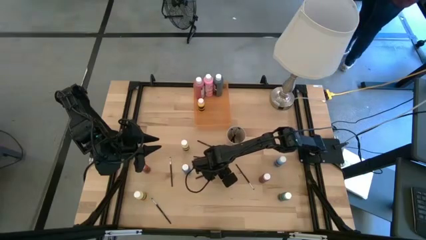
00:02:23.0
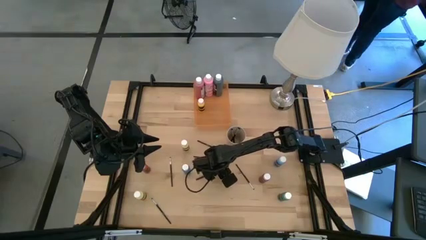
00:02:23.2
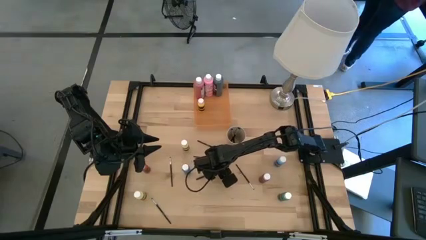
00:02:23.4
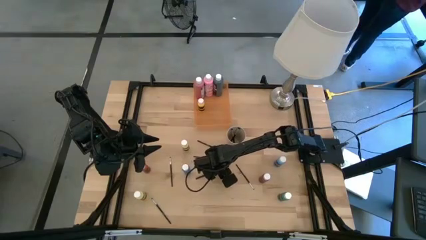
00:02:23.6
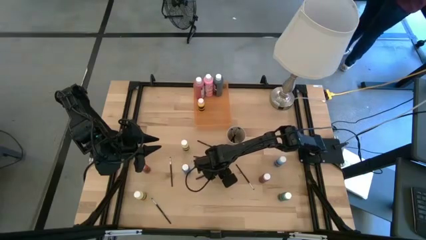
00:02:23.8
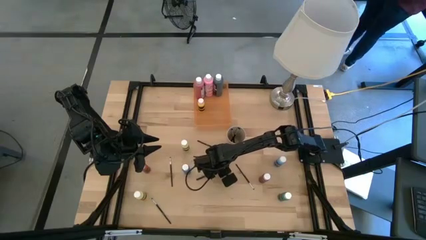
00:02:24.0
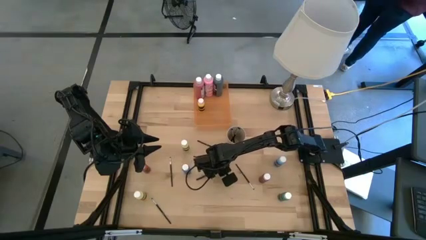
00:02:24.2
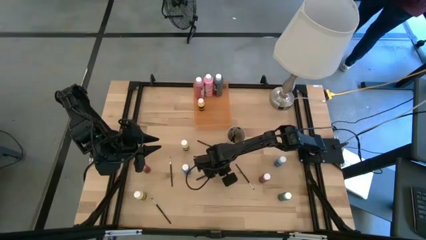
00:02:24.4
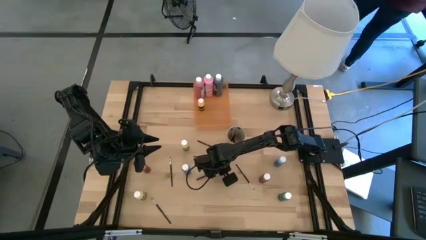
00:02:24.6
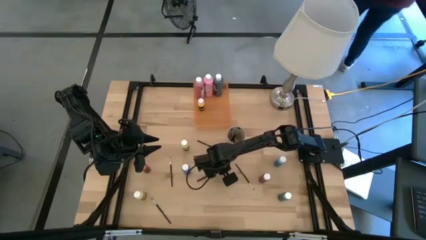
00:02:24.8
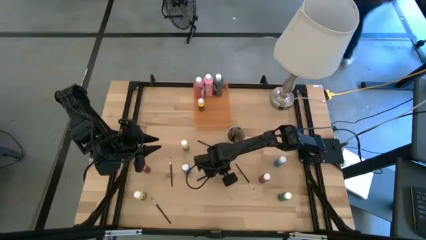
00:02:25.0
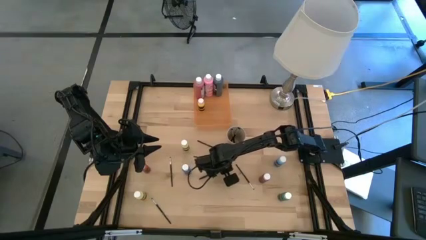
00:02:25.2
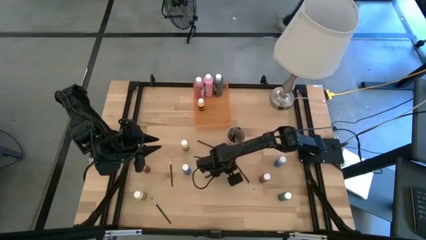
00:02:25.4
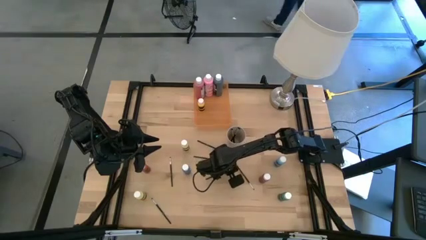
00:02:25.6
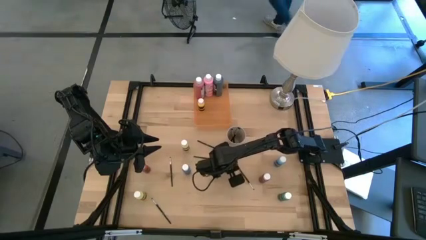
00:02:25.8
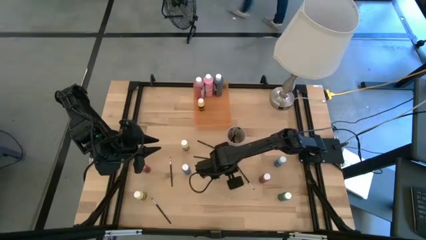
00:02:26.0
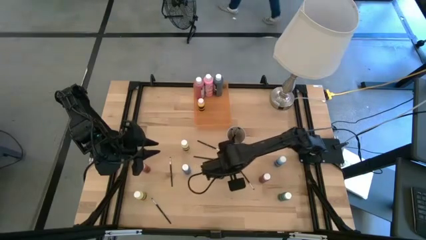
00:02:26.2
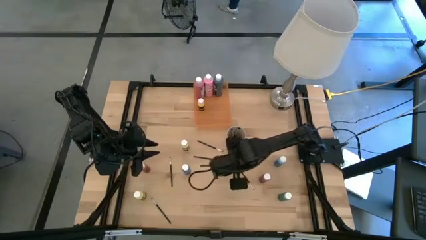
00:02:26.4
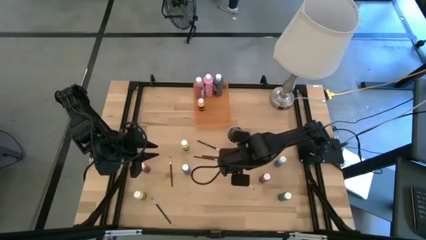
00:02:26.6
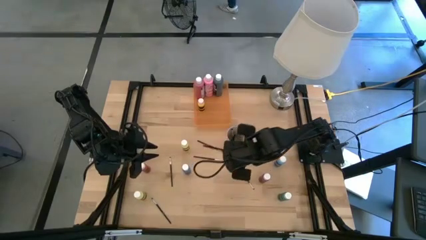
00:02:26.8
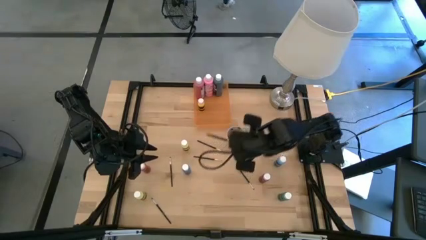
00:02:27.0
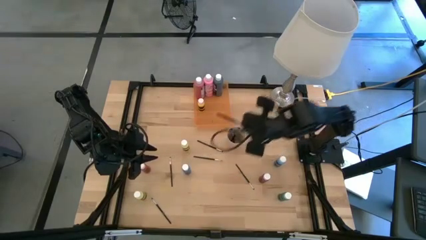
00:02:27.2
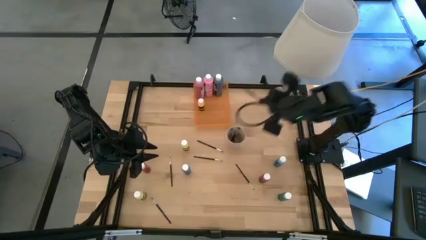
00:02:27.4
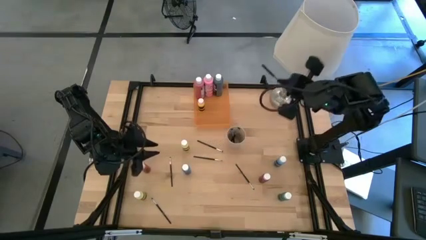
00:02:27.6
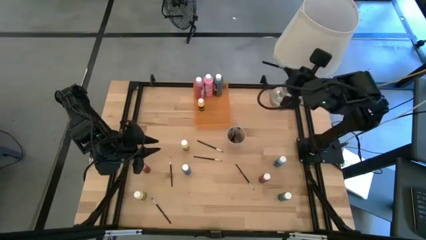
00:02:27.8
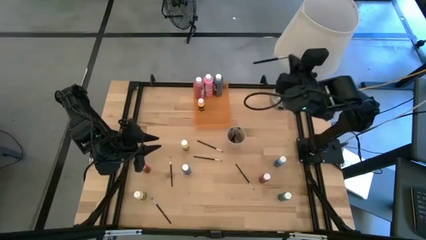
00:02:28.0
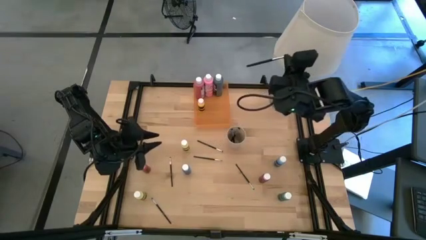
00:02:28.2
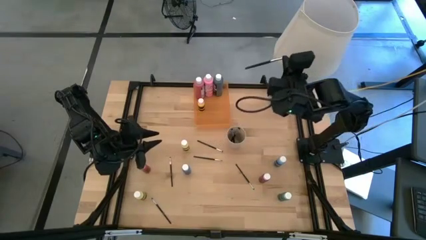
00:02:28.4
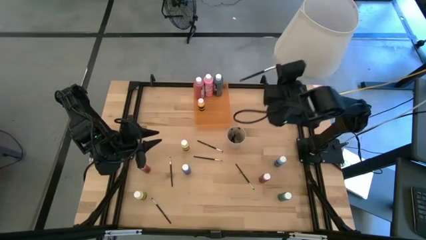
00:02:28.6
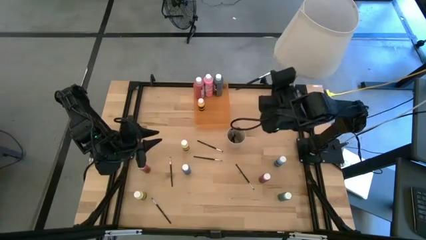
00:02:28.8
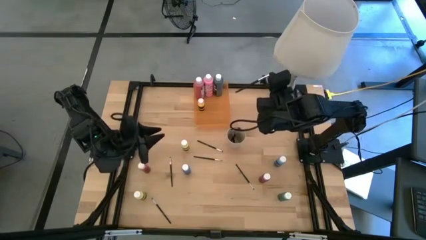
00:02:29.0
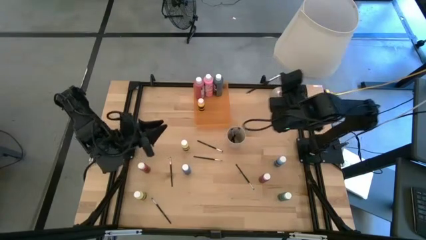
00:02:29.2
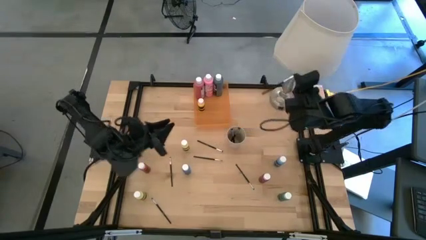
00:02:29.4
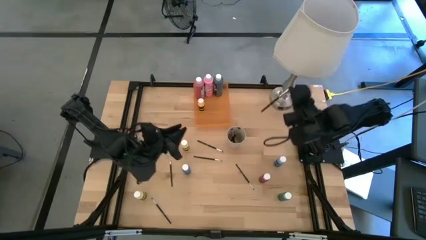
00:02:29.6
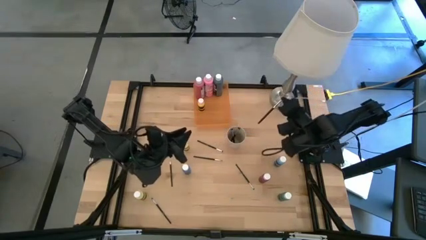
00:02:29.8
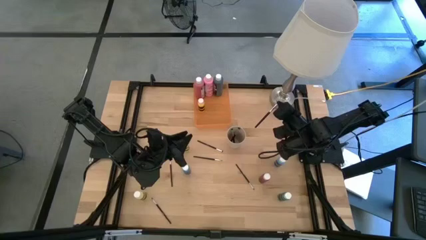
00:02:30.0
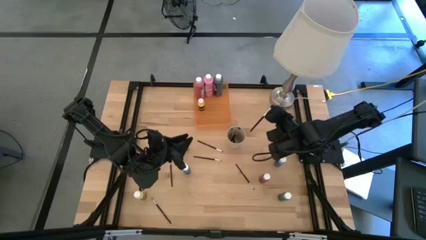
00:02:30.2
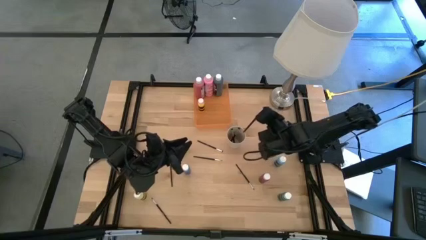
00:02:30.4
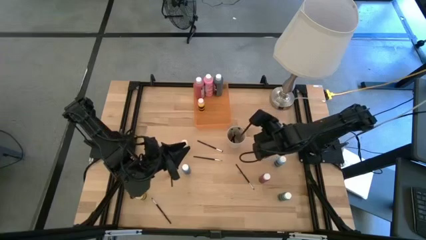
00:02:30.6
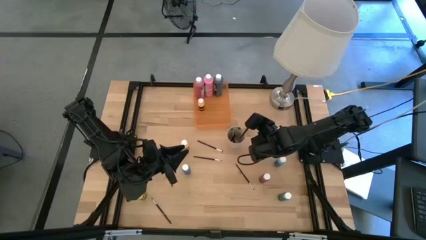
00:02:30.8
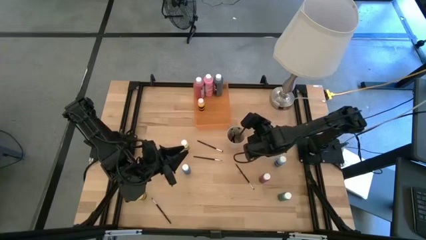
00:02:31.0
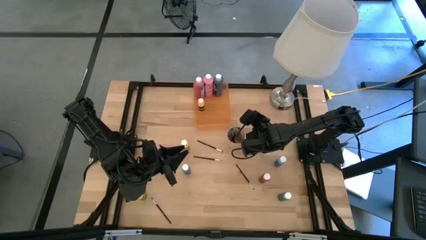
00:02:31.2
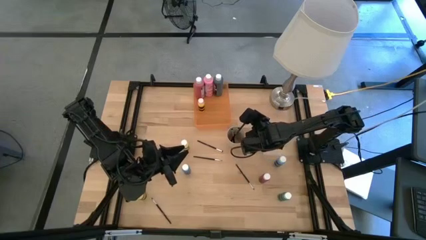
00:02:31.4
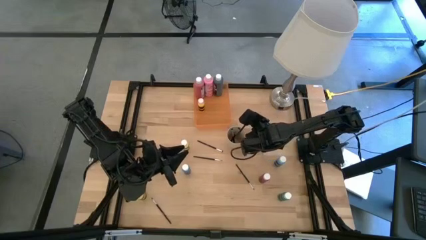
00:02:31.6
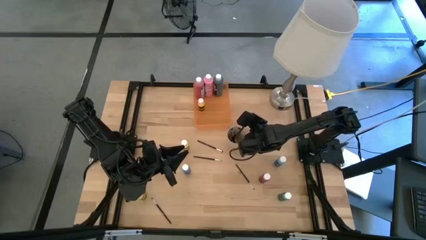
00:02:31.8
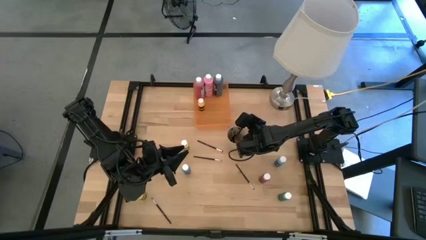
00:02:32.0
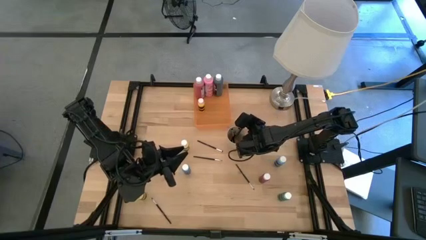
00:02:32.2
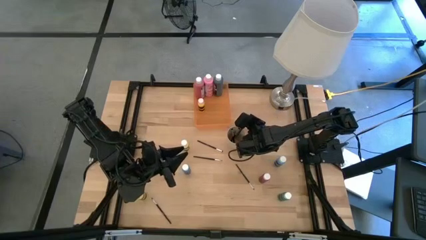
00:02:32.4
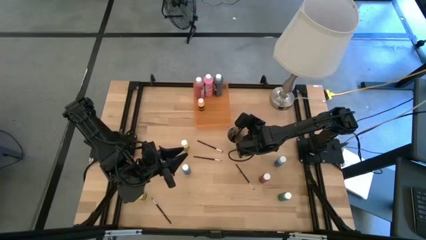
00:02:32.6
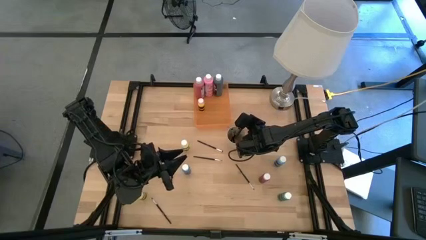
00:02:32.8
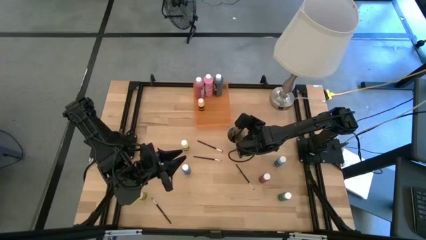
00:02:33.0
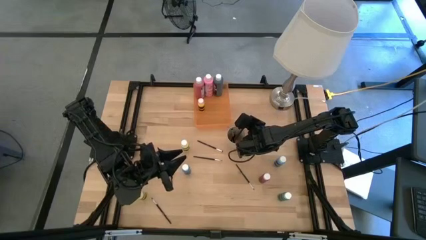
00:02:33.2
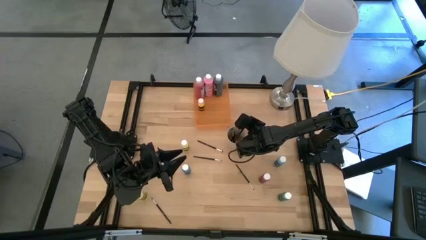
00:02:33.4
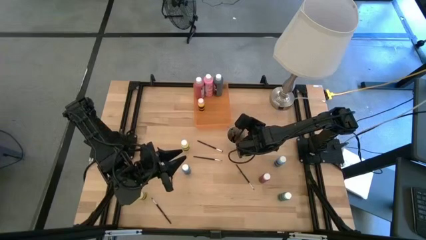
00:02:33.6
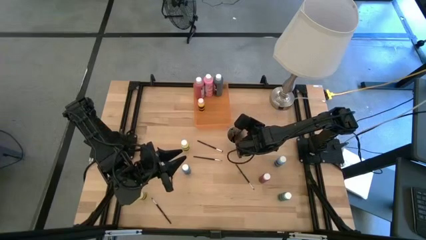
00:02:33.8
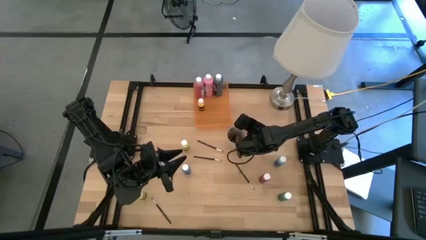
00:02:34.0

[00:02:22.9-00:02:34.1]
Task: Pick & Place Paint Supplies
Put the black paint brush into the light brown cup

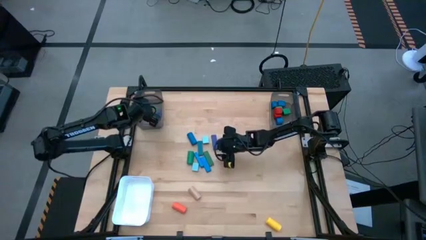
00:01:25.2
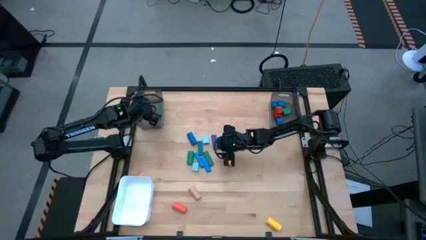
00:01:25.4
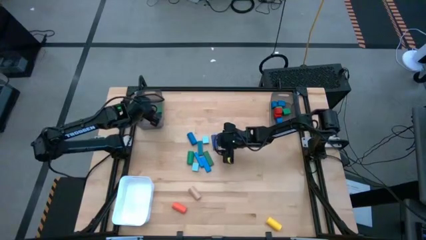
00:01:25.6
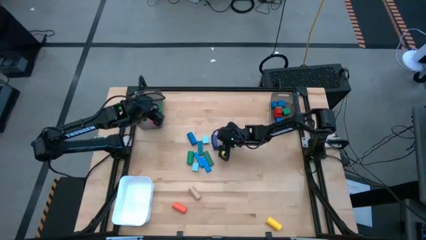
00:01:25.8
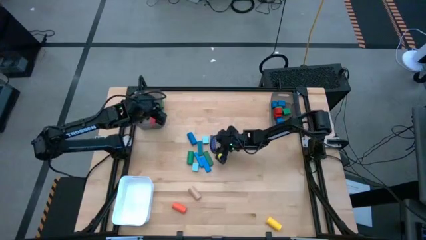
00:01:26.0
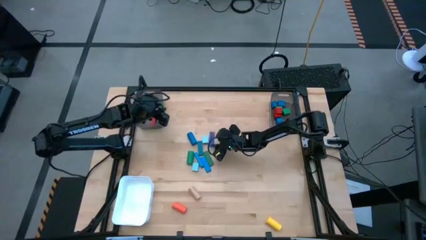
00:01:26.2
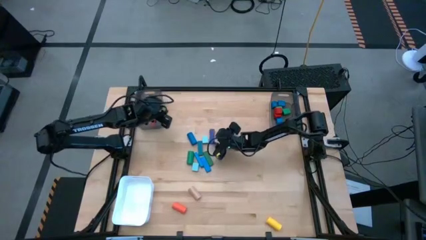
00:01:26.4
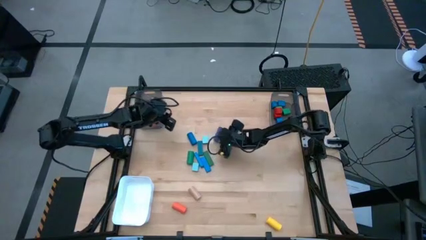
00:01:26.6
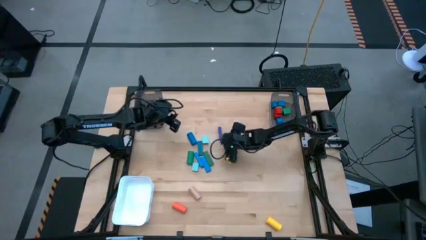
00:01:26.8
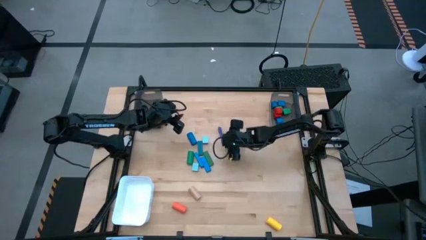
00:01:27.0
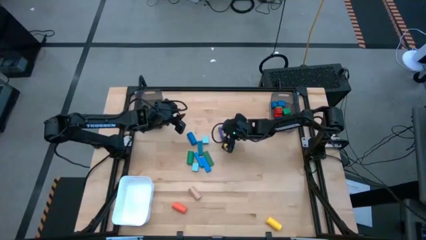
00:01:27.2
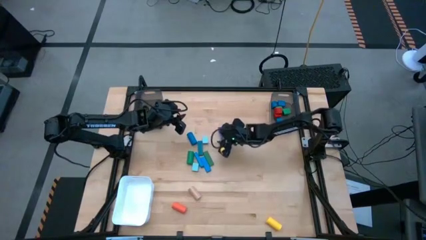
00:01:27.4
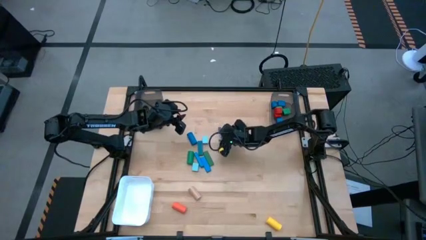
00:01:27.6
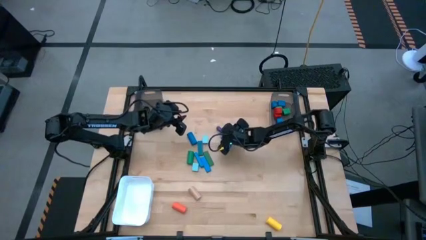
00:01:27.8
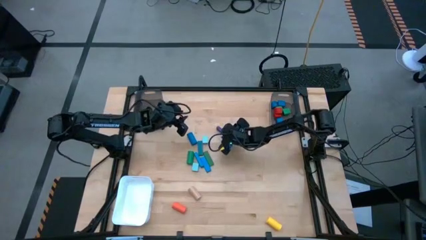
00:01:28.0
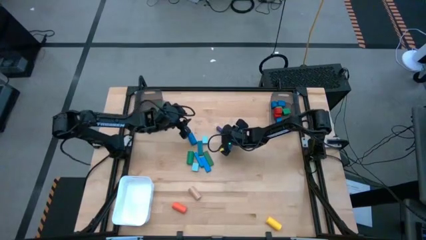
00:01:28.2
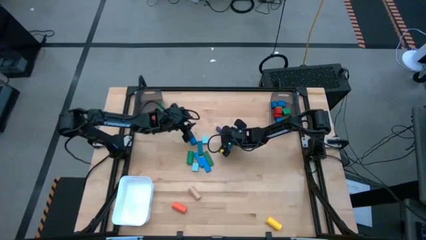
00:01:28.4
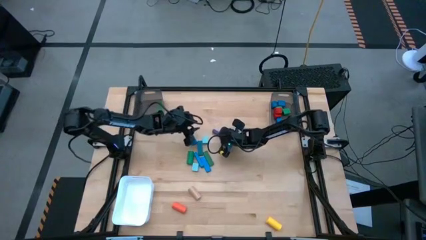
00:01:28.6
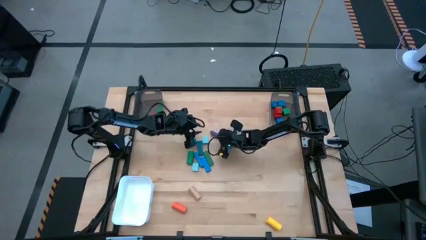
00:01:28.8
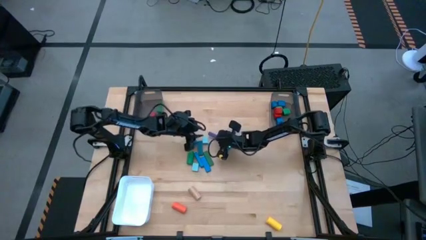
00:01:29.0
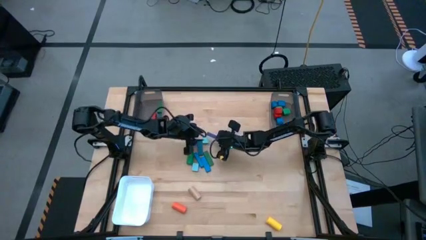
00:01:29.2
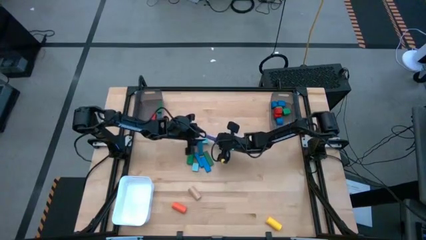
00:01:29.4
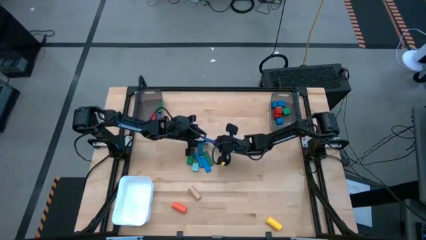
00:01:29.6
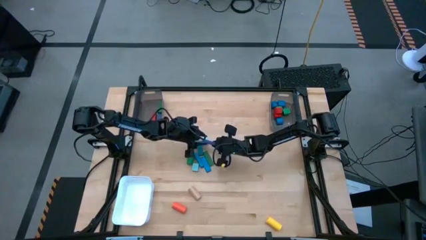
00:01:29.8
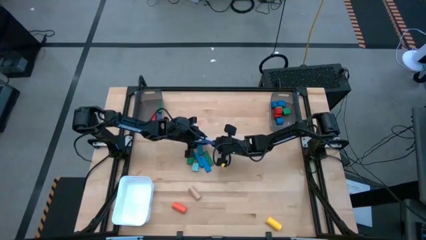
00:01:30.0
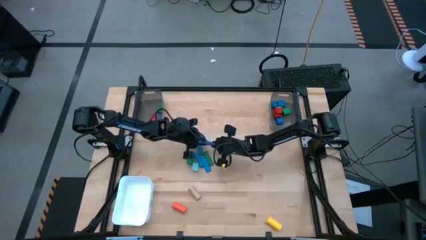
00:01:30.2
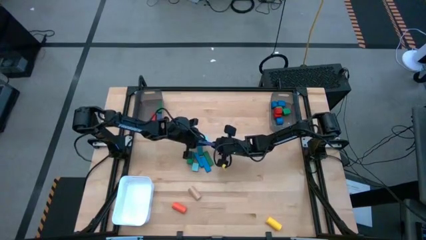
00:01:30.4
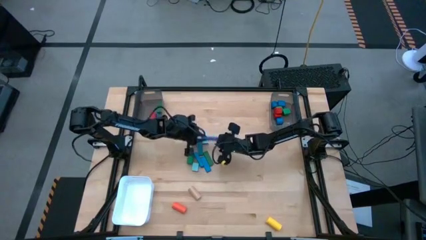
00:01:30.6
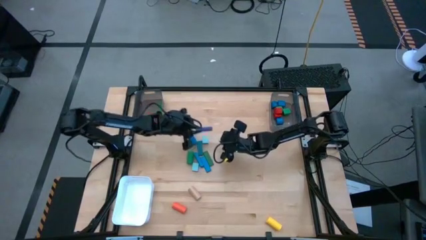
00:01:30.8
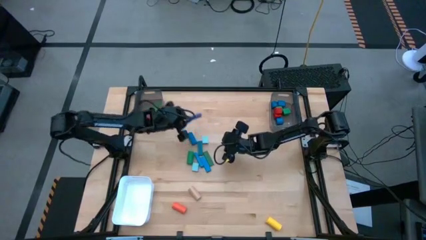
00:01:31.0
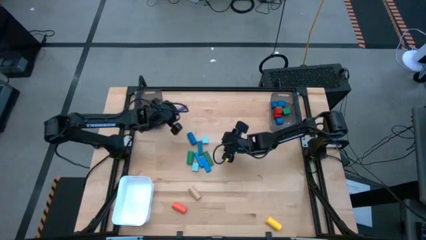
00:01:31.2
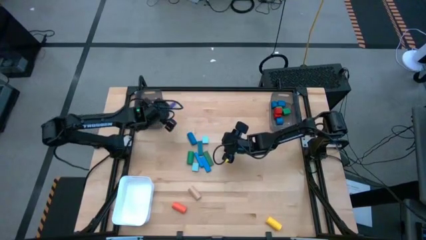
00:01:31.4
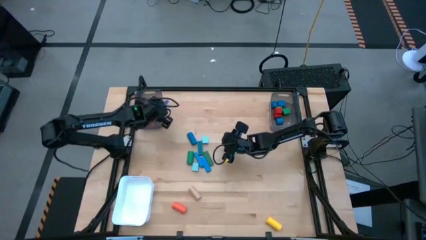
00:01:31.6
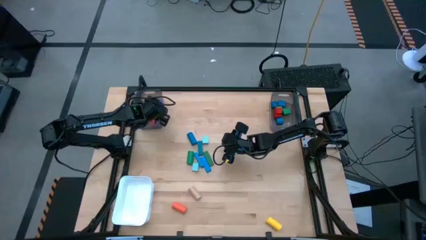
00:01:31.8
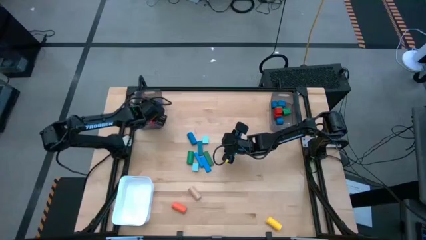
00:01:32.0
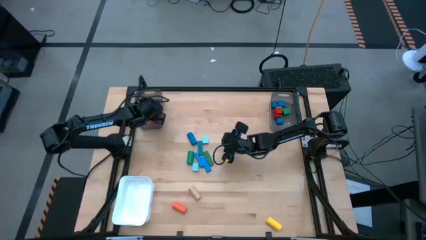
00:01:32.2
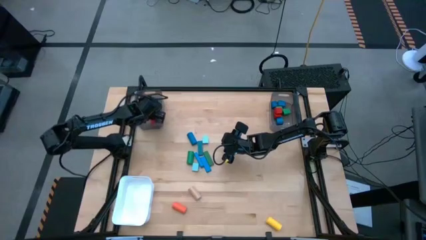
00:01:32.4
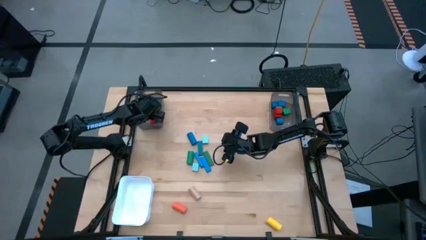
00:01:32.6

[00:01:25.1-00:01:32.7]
Task: Sort blocks by size
Put the blue rectangular block into the left black bin
